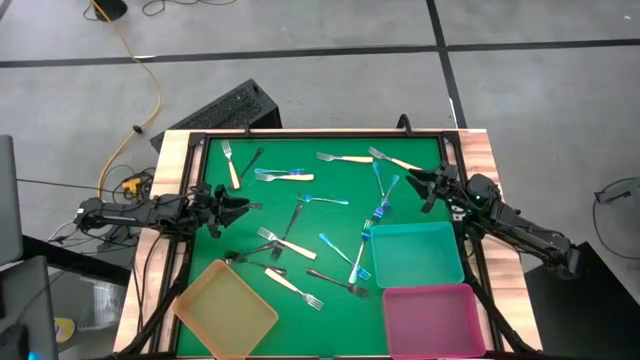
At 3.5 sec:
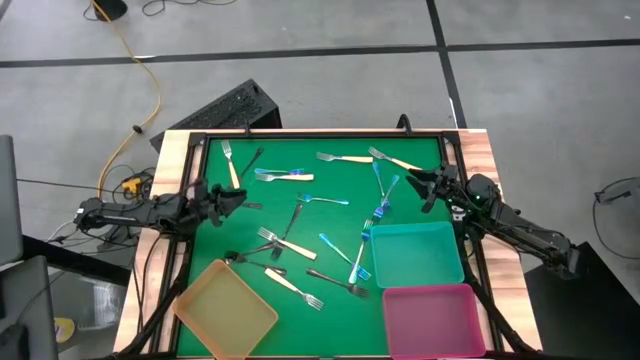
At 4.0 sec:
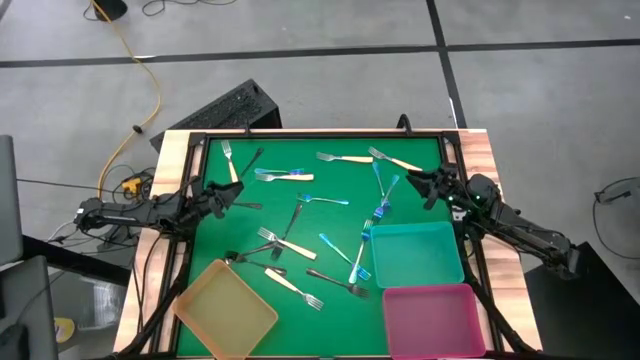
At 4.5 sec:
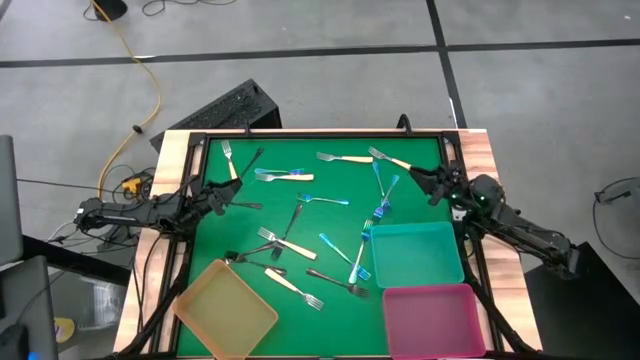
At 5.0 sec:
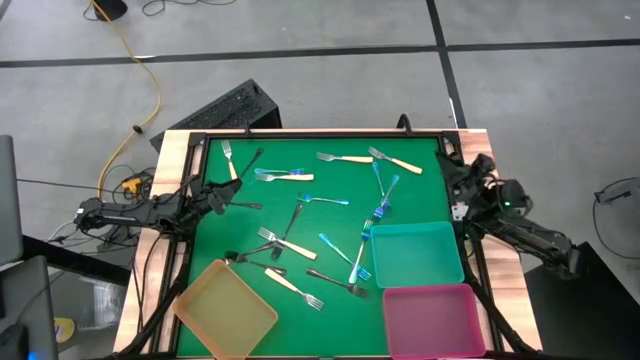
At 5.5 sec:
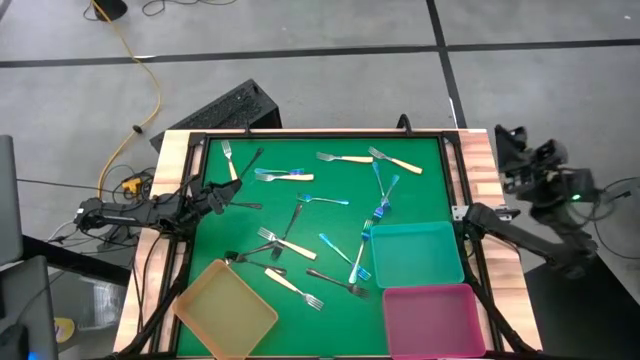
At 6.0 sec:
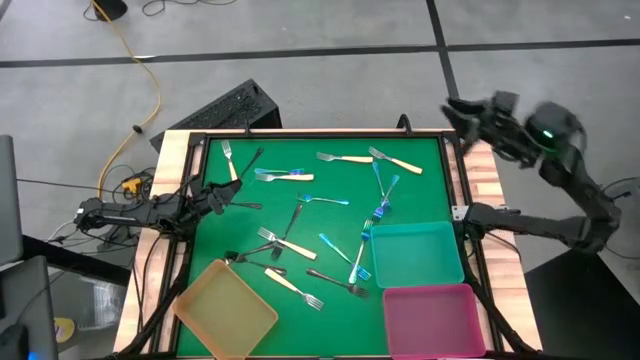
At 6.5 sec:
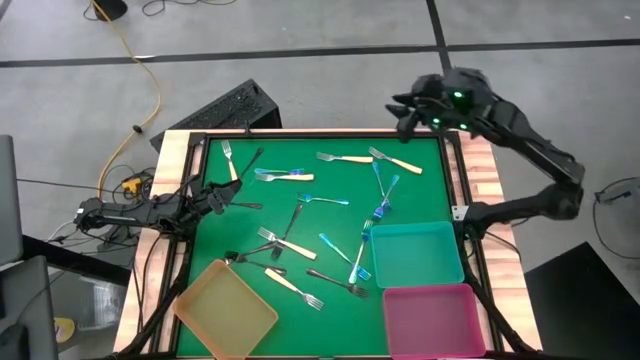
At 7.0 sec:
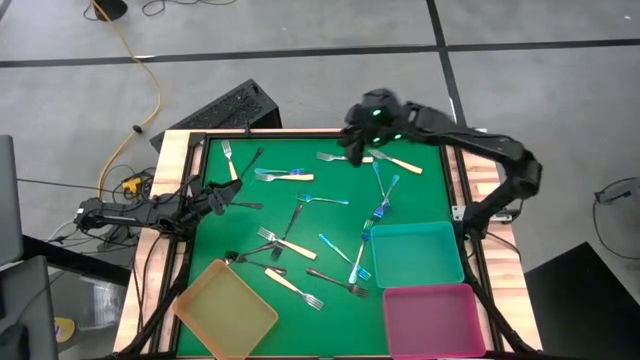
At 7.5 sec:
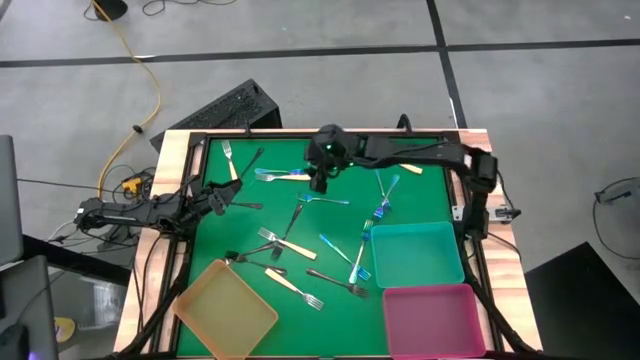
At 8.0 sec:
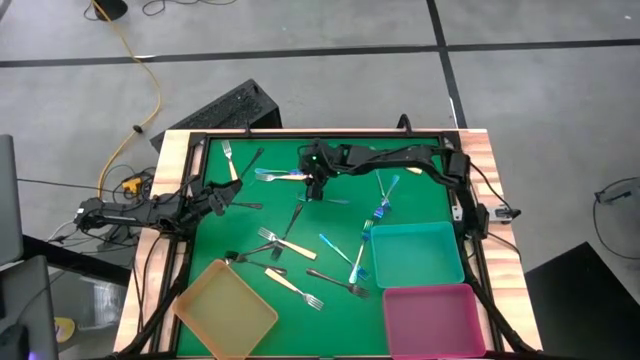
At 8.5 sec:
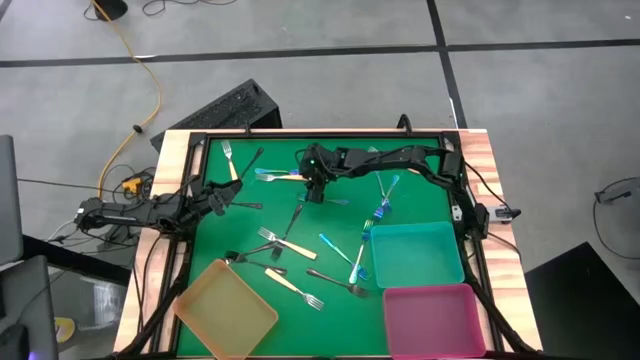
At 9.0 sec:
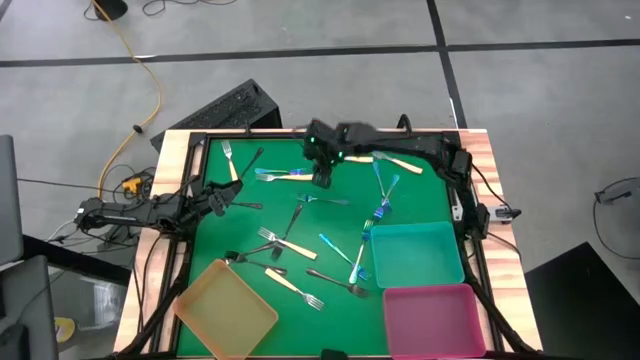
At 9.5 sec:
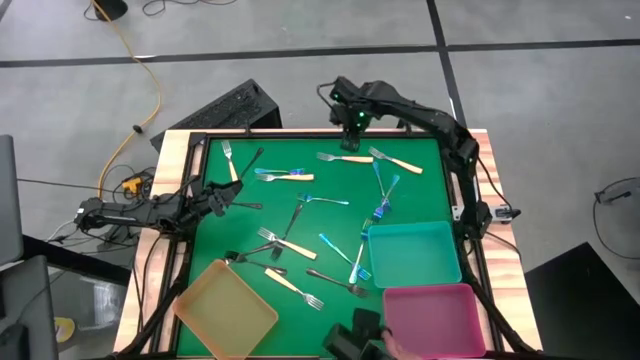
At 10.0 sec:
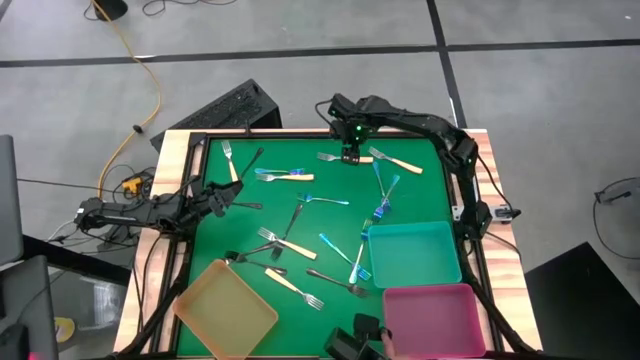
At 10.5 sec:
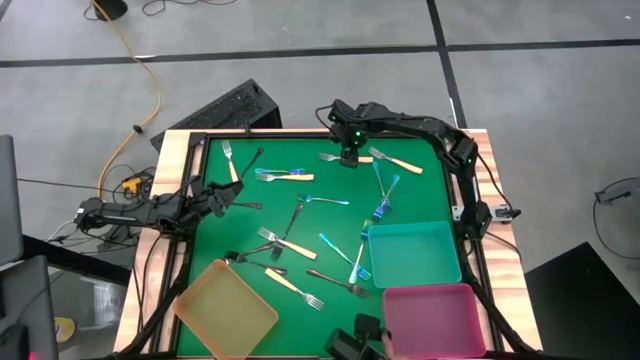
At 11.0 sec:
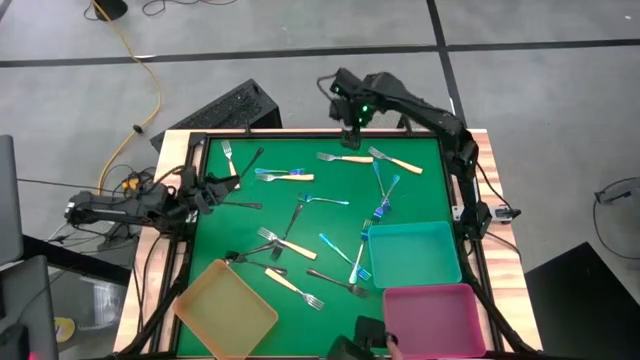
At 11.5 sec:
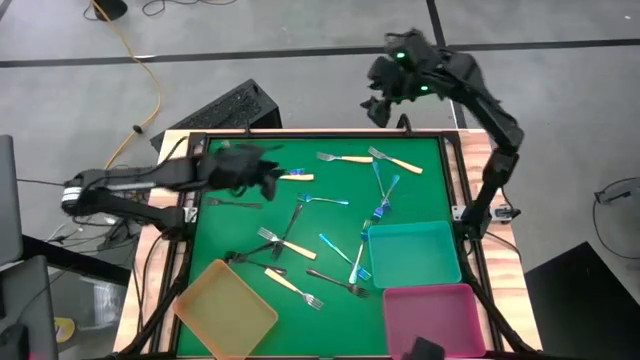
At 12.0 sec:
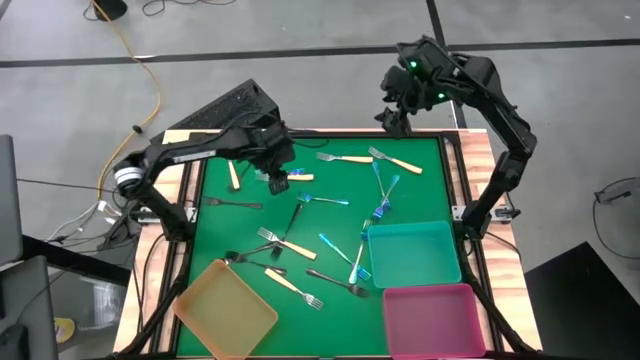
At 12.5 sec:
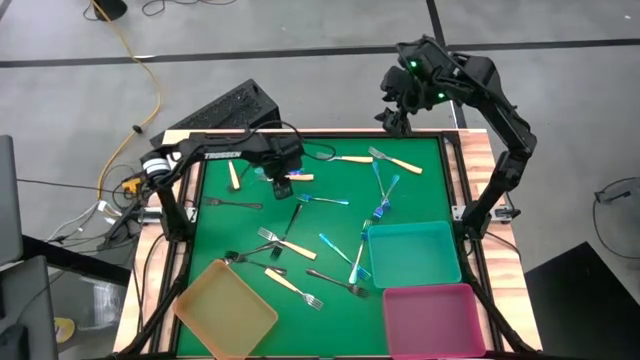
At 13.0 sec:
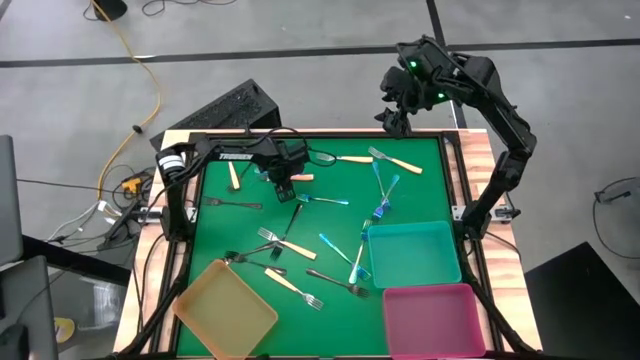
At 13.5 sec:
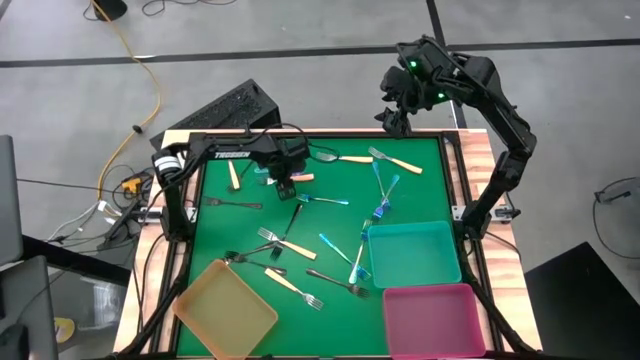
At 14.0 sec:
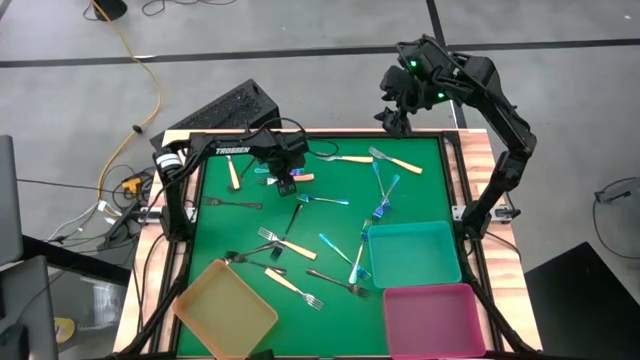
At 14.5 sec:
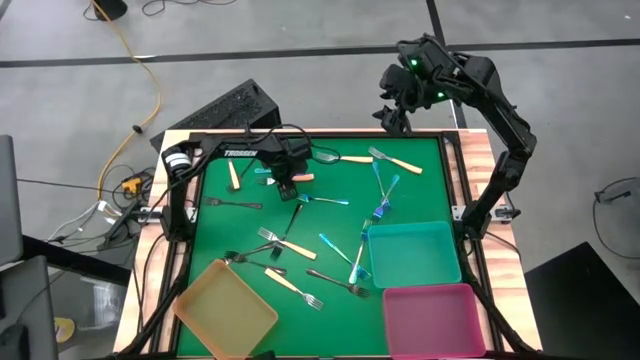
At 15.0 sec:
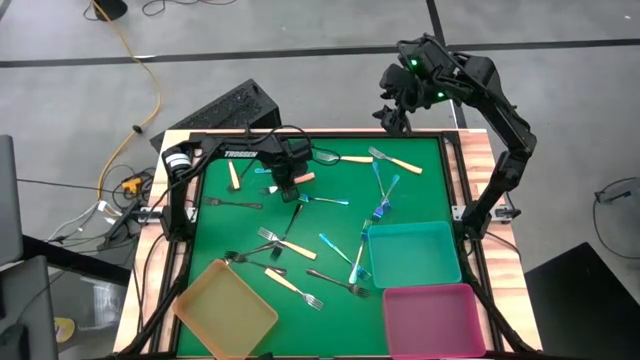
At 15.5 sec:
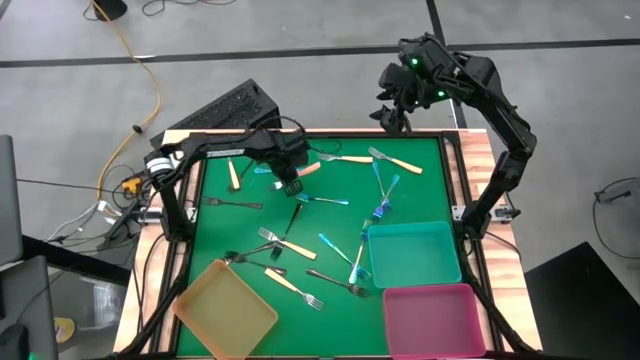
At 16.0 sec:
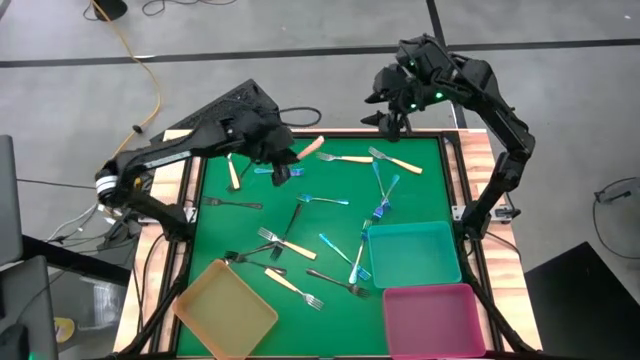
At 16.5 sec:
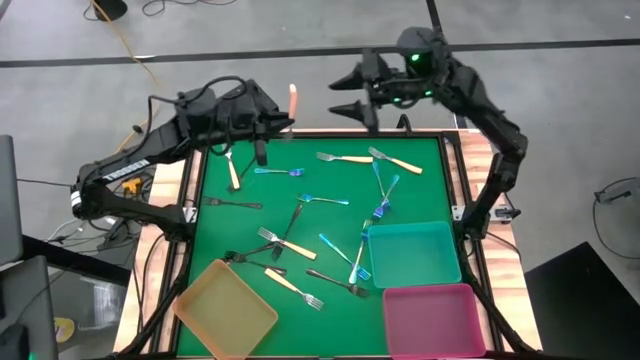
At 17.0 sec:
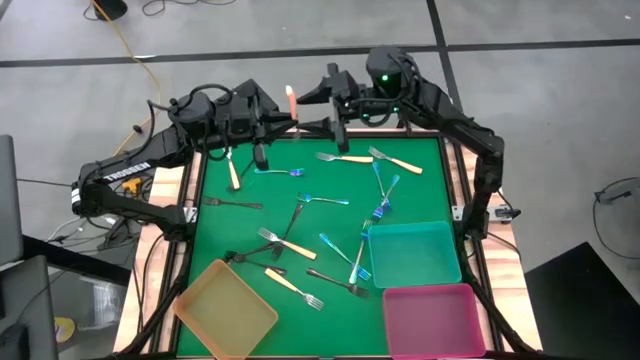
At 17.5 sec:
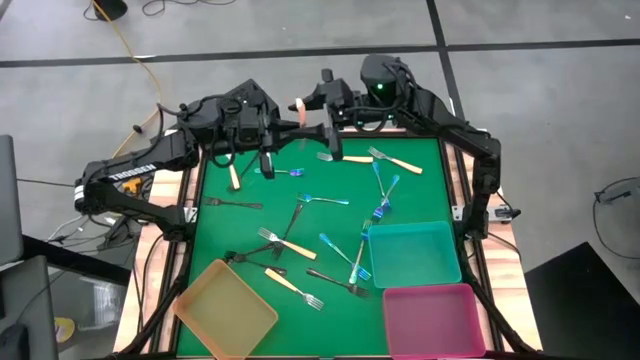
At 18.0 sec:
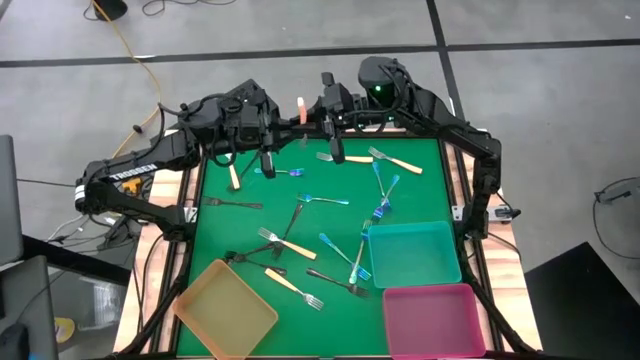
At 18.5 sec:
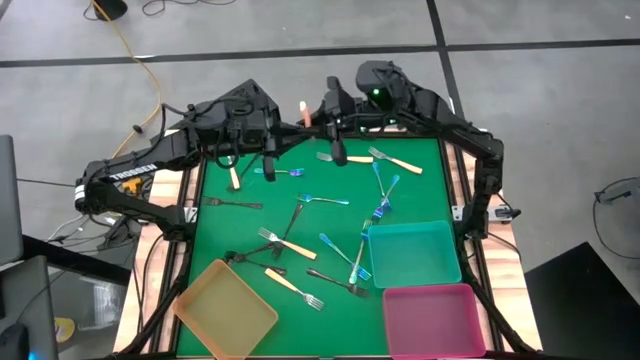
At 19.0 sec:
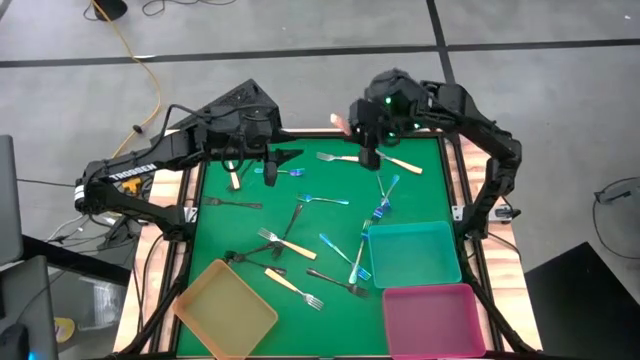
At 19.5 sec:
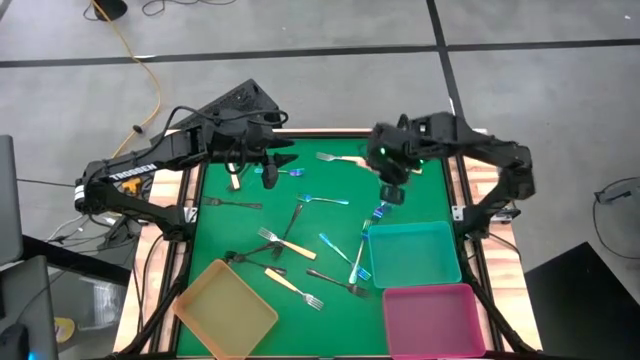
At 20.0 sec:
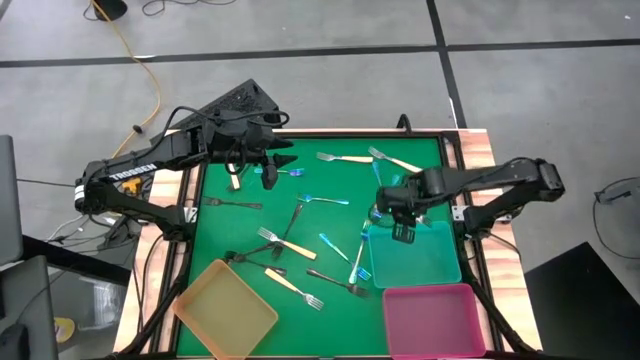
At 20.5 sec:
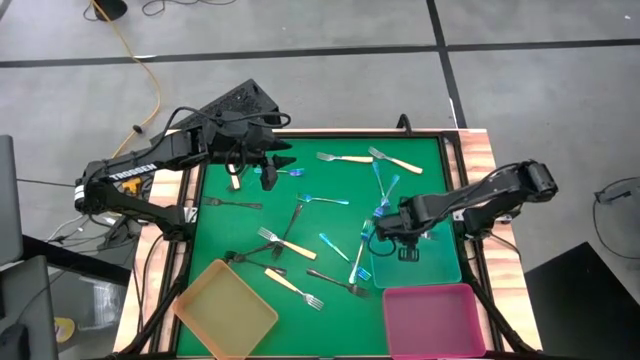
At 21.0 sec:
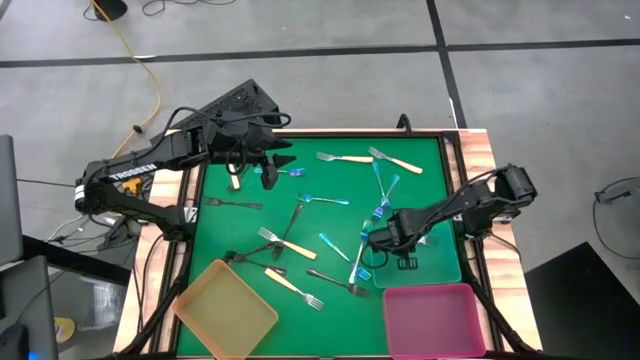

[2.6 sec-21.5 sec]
Task: Sort silverware by color (type)
Put the yellow fork into the green bin
